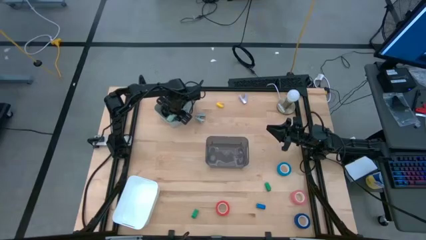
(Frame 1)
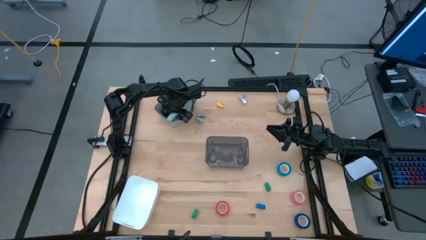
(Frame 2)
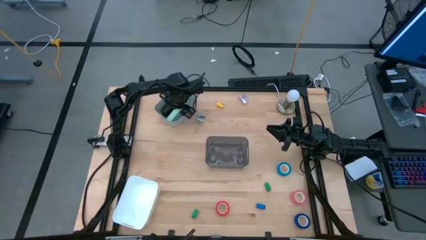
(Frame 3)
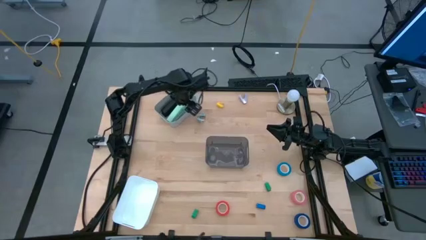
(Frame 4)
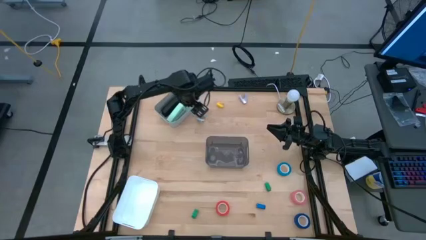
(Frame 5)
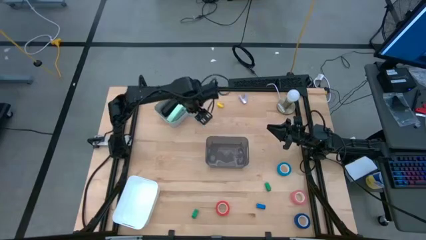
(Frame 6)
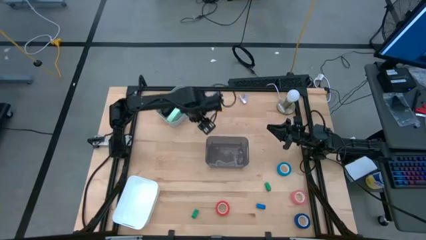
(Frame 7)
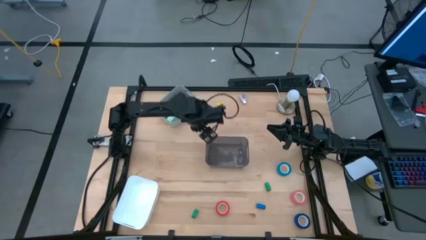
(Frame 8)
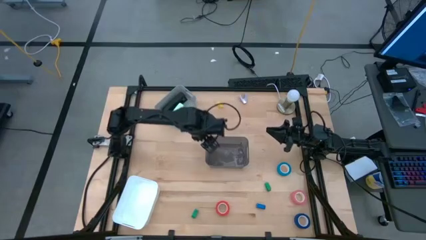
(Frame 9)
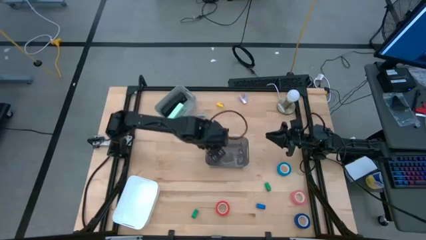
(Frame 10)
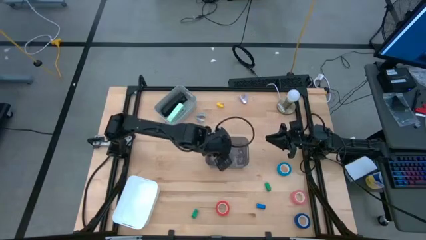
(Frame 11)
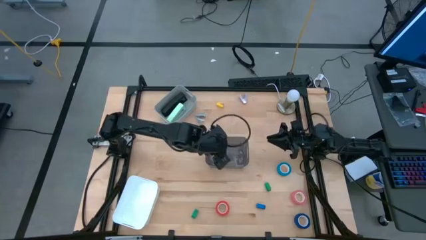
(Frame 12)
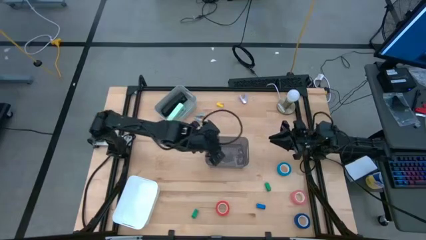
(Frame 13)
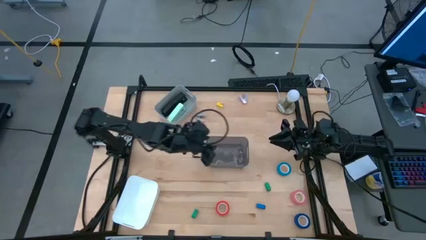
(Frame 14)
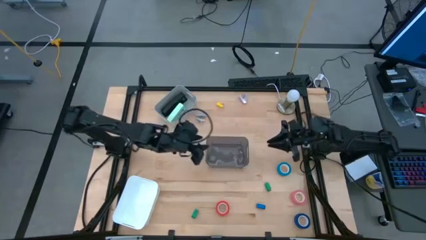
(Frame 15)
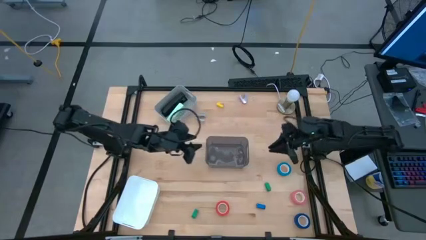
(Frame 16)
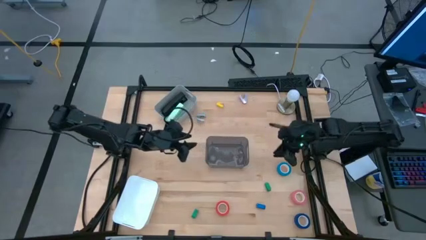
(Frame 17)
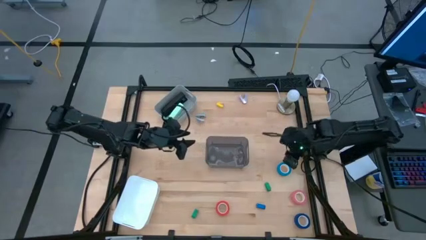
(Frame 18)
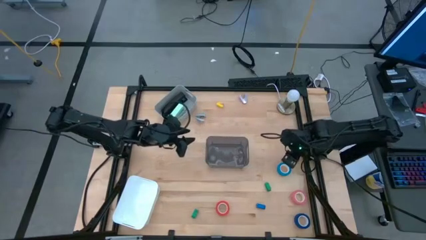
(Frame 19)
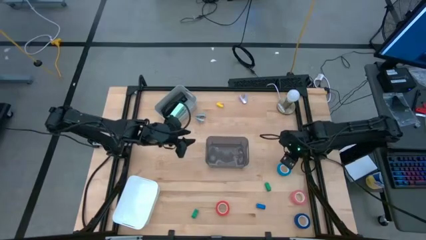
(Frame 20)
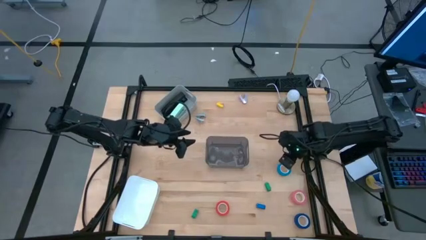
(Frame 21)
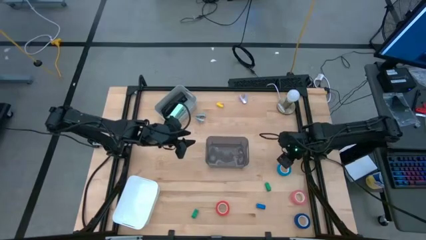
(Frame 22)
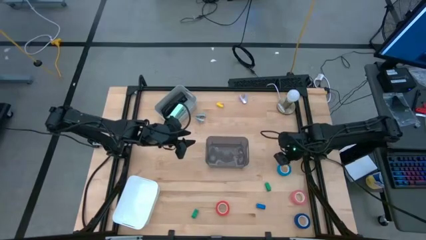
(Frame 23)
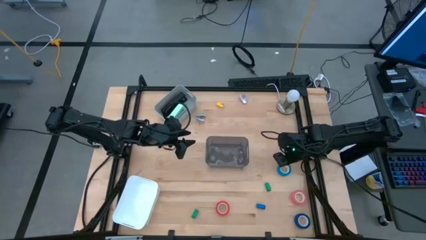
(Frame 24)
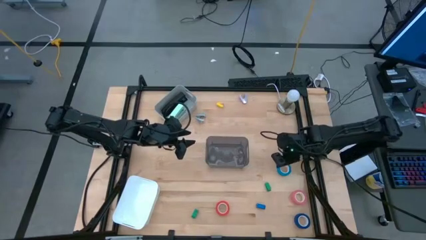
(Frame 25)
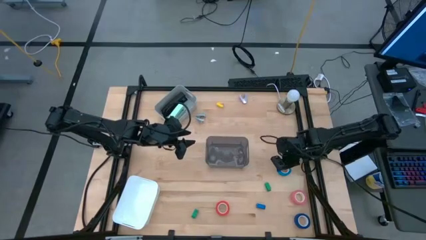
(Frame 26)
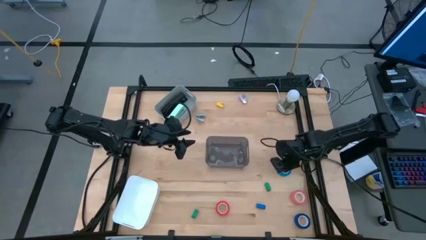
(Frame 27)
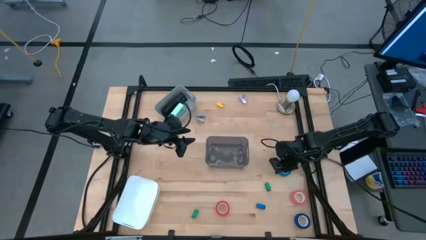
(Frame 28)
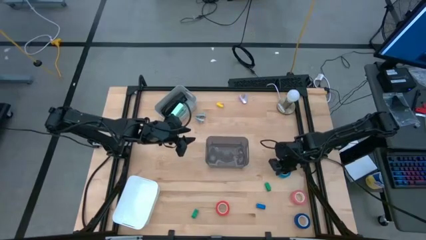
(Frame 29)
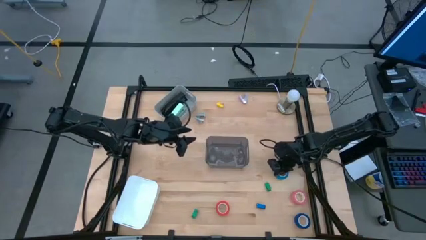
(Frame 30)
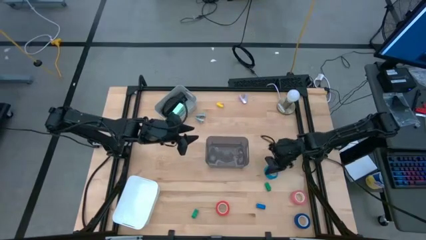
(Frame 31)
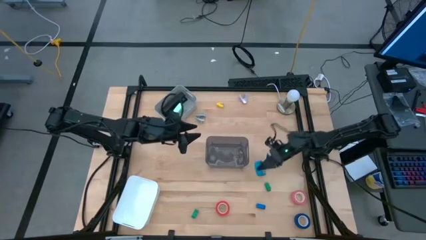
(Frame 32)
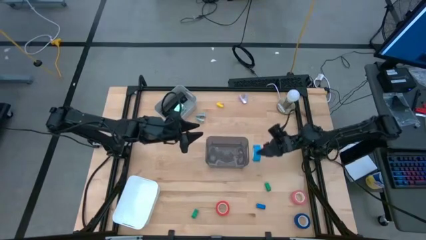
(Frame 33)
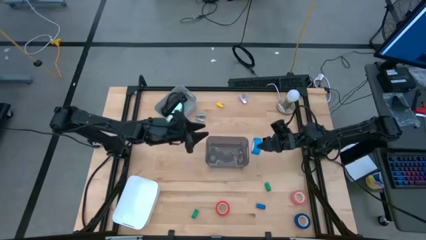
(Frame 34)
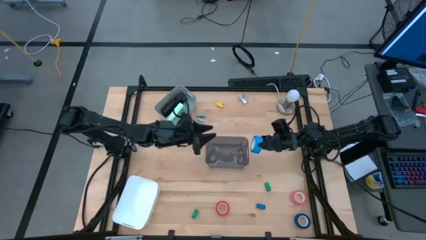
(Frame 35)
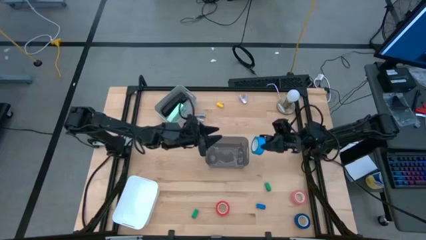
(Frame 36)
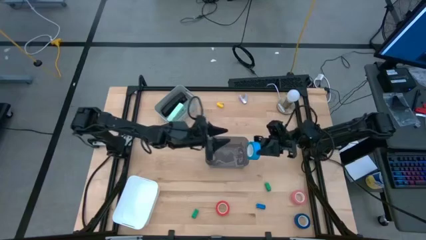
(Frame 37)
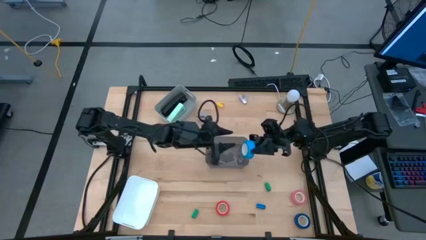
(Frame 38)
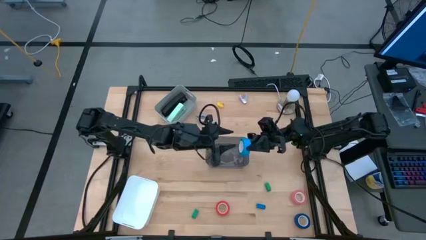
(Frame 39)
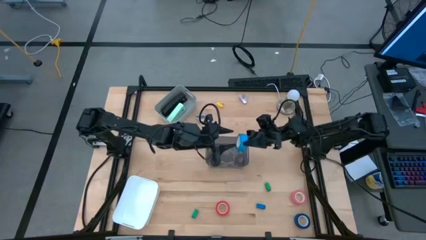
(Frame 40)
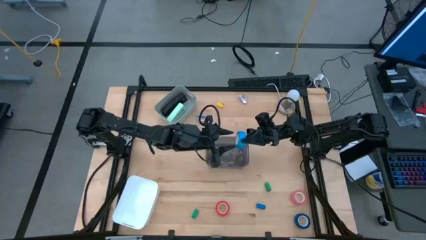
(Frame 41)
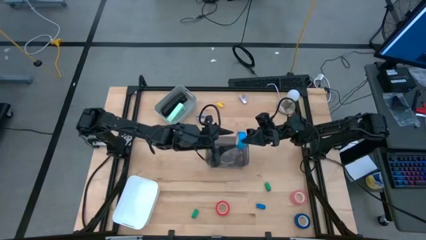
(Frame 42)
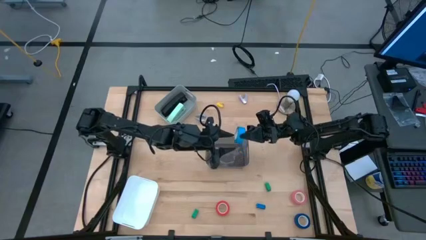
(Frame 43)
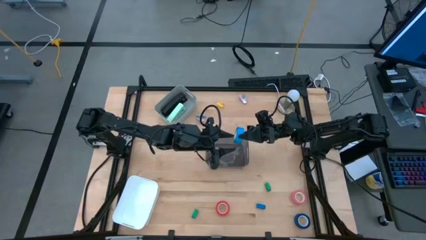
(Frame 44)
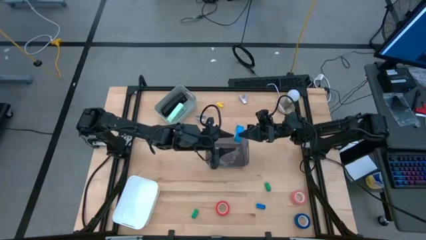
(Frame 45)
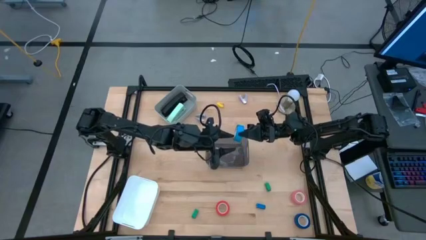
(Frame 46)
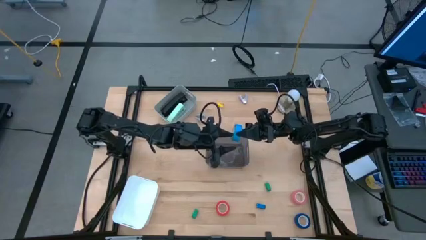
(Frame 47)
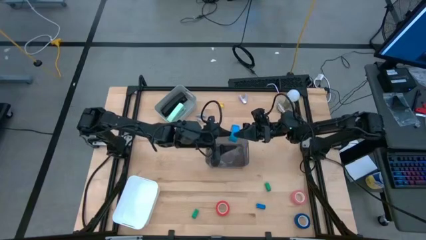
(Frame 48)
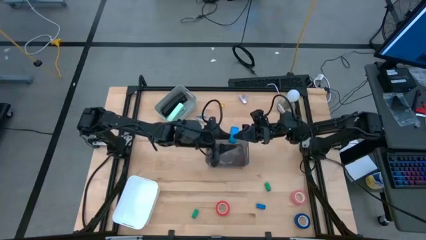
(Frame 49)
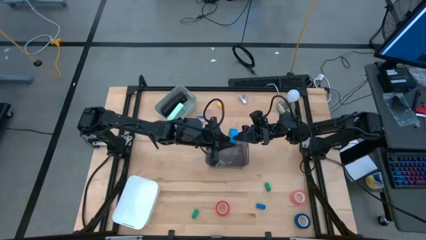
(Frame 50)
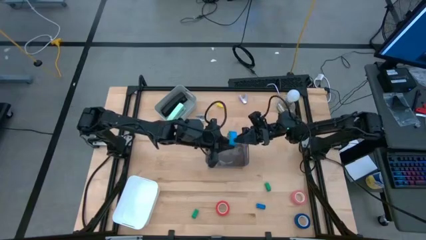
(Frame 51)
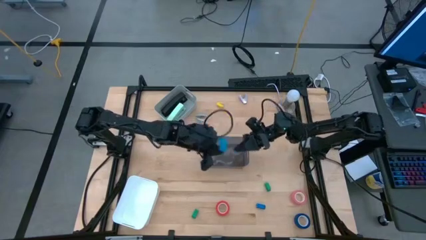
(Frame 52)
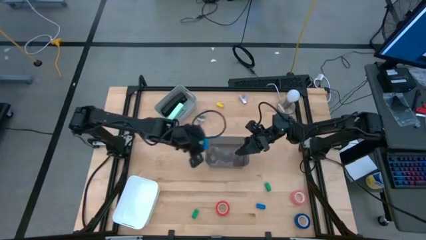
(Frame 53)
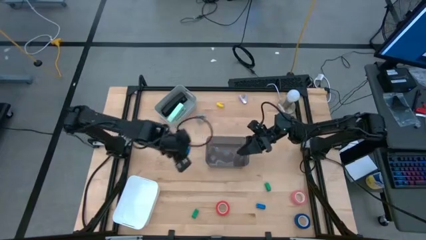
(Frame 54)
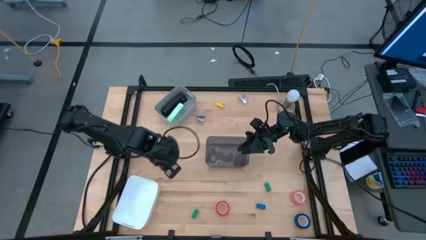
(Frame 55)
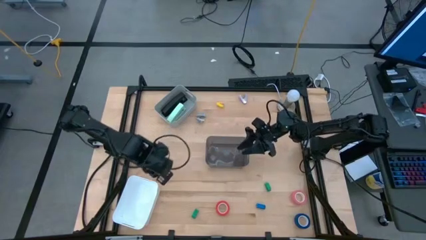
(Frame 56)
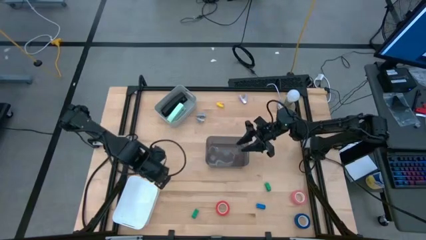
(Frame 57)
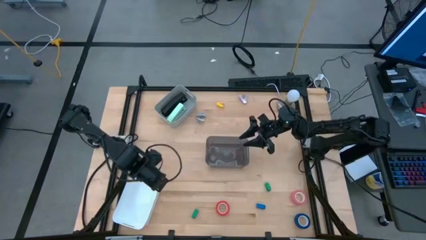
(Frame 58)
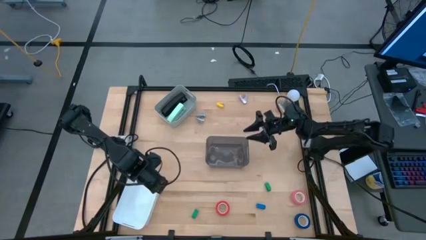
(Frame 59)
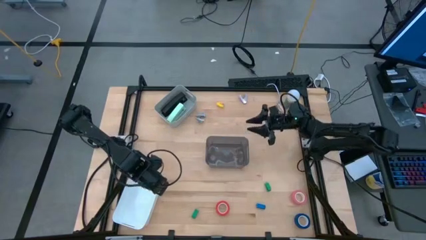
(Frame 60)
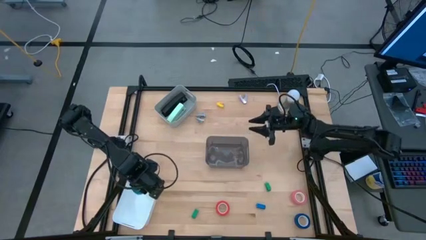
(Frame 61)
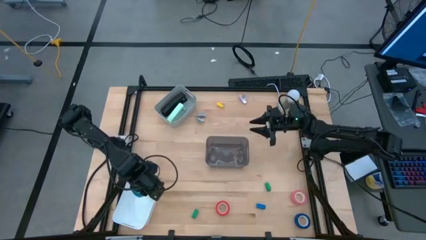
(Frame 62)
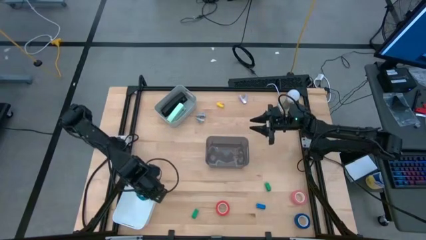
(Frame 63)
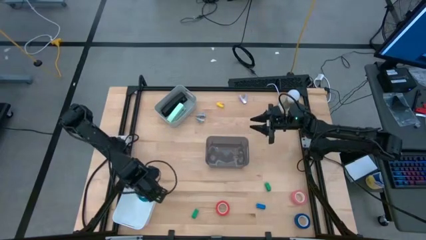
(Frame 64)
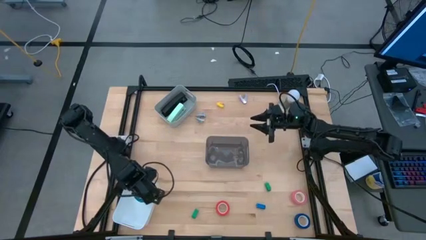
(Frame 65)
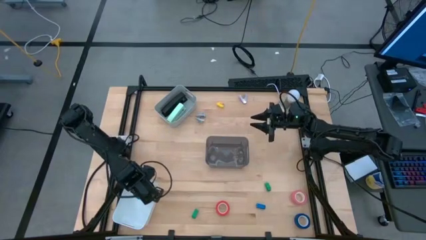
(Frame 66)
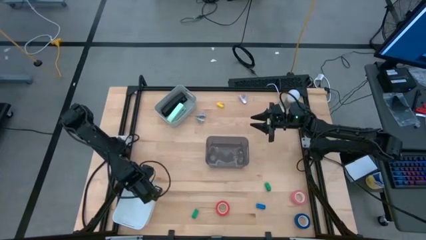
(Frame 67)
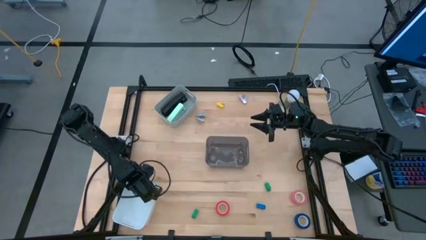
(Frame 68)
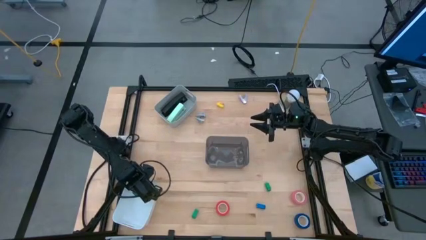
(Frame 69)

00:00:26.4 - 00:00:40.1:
Task: Pick and place Stapler, Stapler remover, tape
Put the blue tape into the white bin
